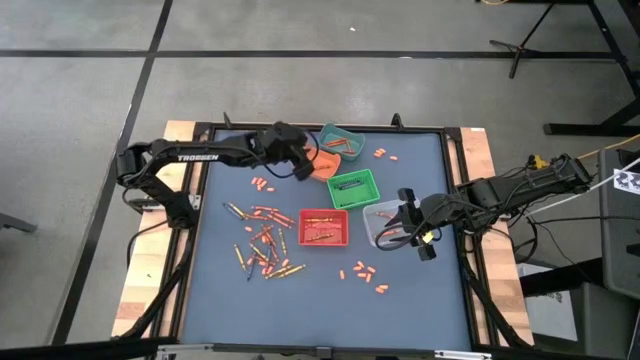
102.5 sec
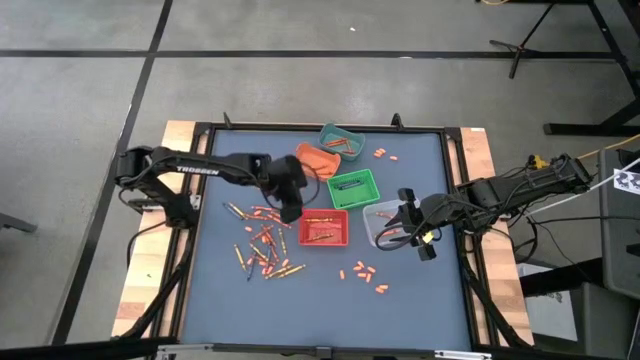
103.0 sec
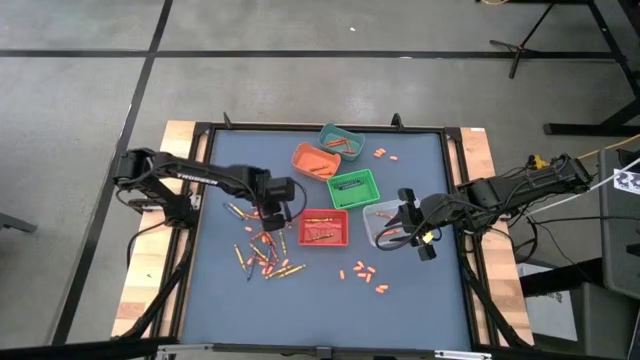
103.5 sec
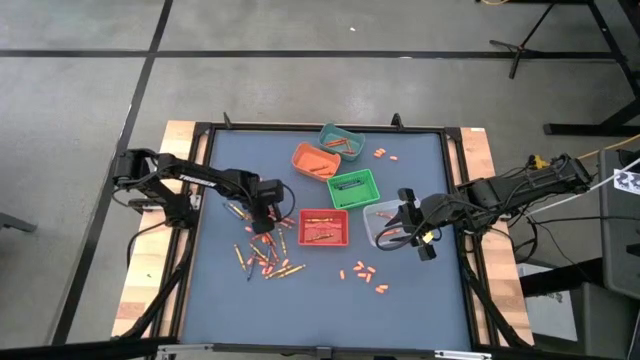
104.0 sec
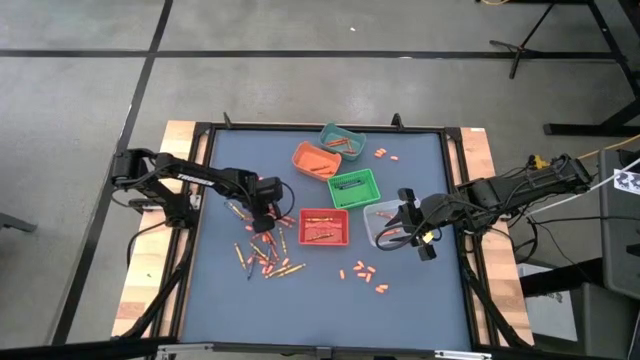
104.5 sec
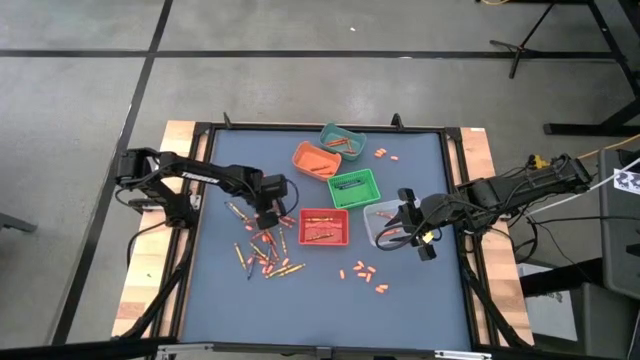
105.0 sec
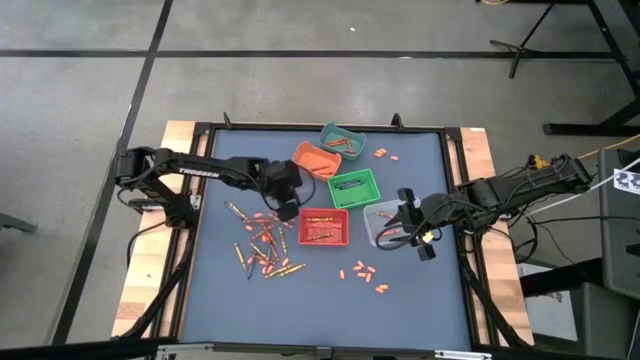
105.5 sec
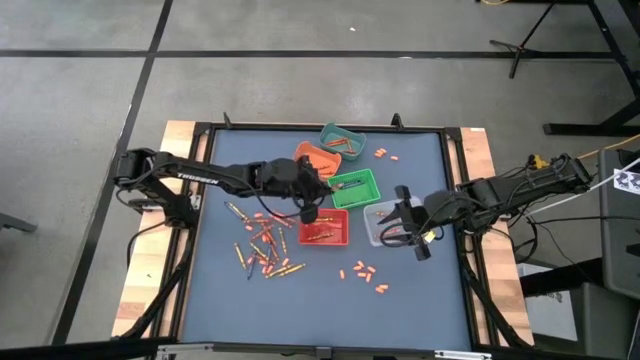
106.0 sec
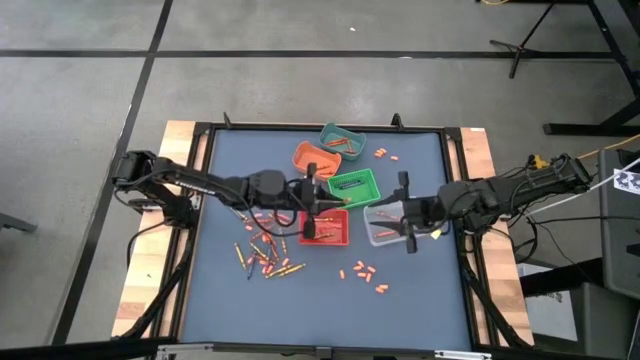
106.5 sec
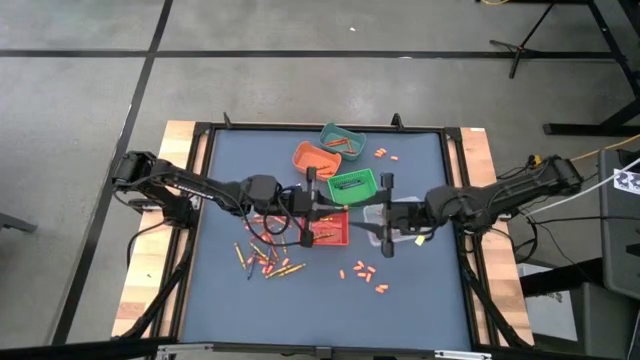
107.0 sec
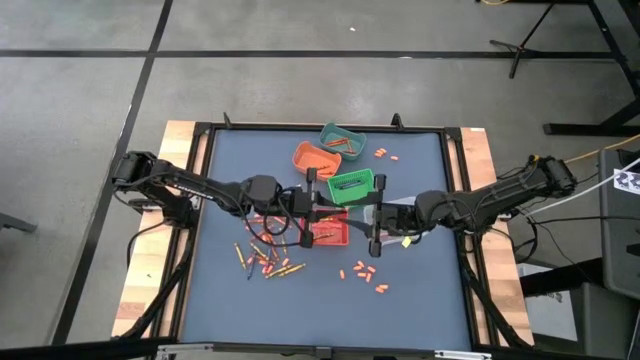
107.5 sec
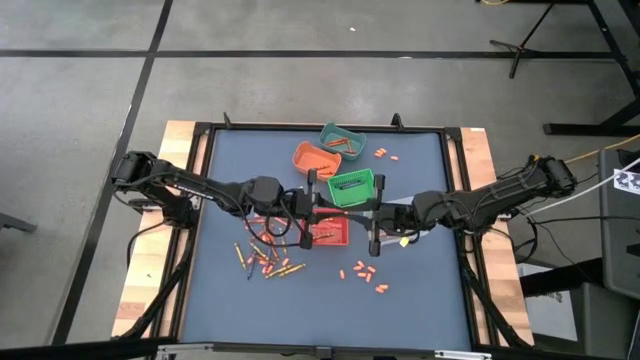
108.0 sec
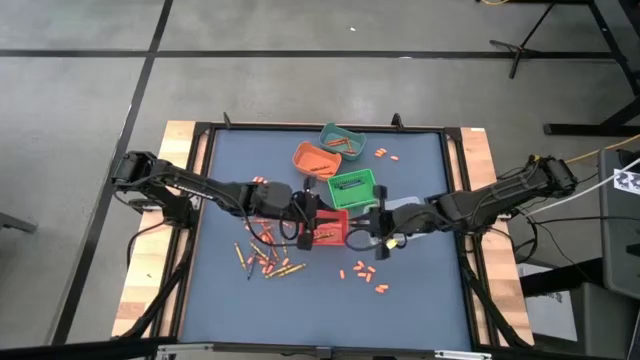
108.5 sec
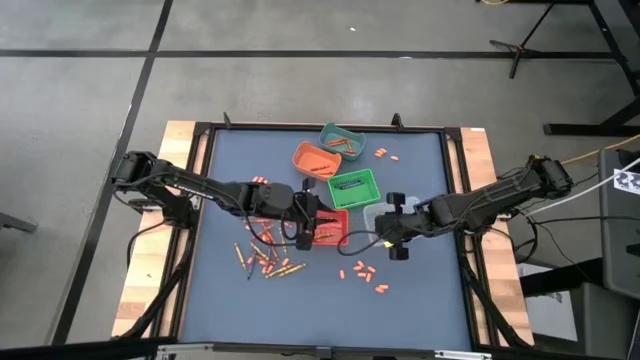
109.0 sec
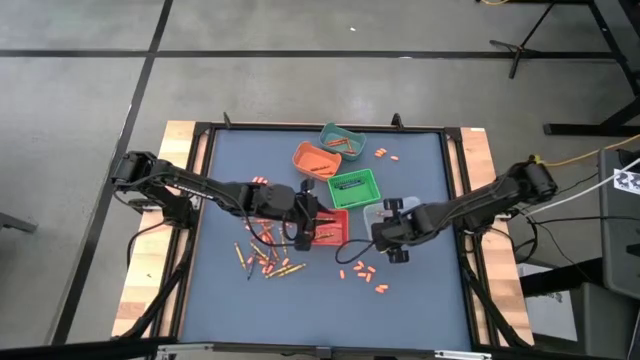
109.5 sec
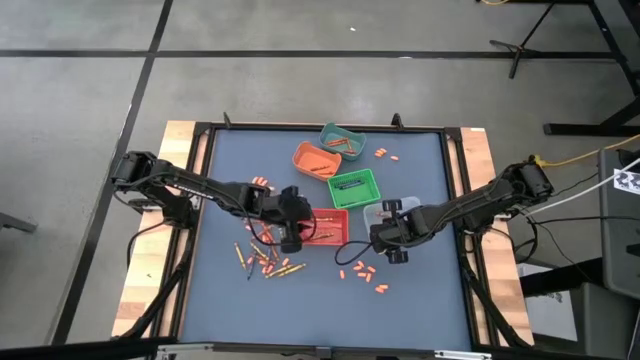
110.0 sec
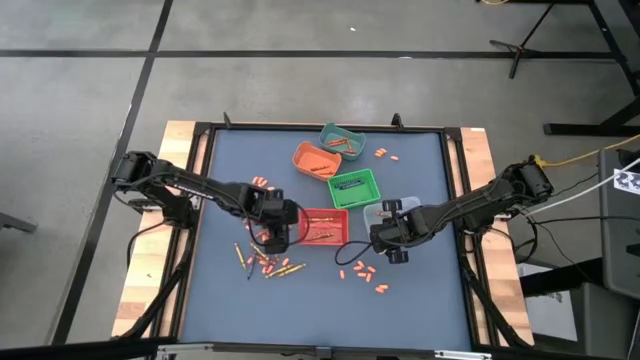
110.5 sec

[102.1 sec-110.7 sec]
Task: Sort crayons
Put the light orange crayon into the transparent bin

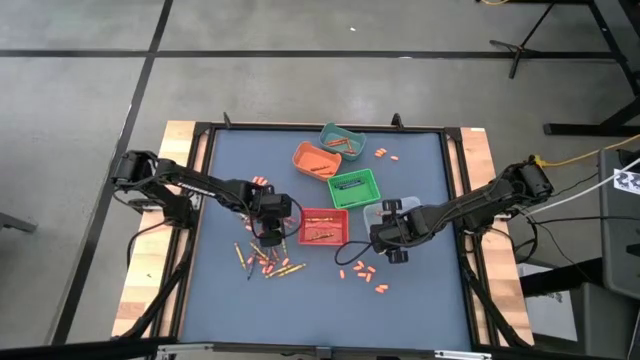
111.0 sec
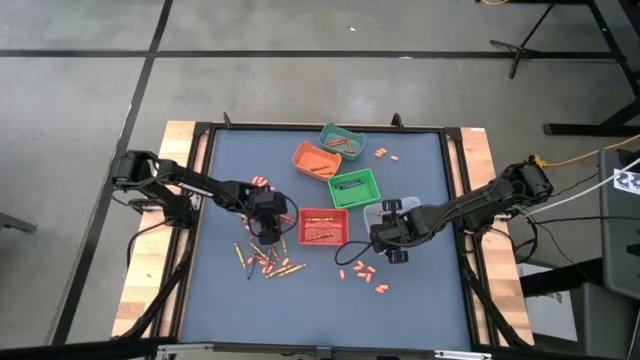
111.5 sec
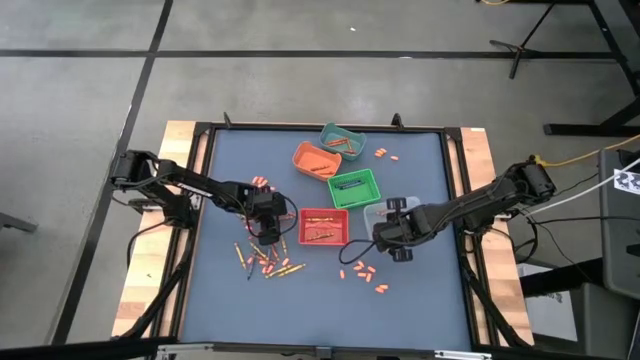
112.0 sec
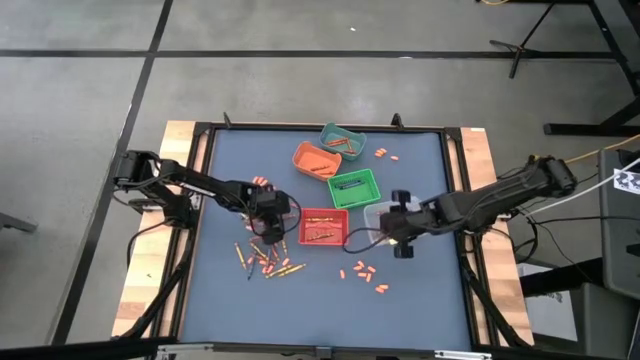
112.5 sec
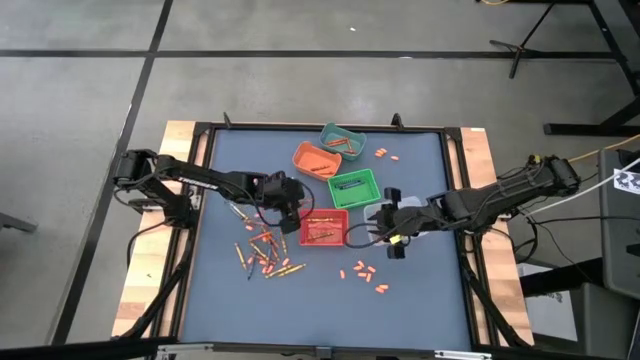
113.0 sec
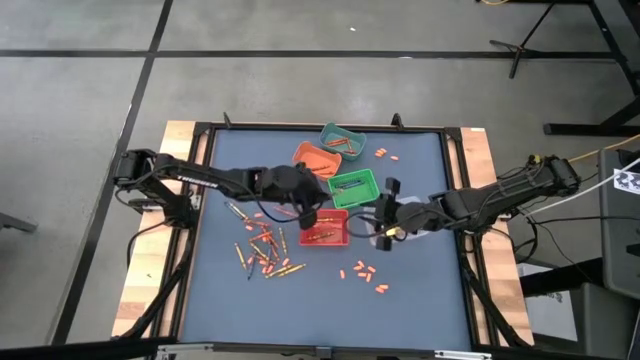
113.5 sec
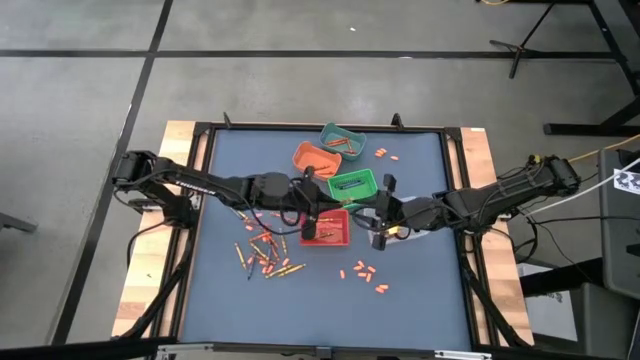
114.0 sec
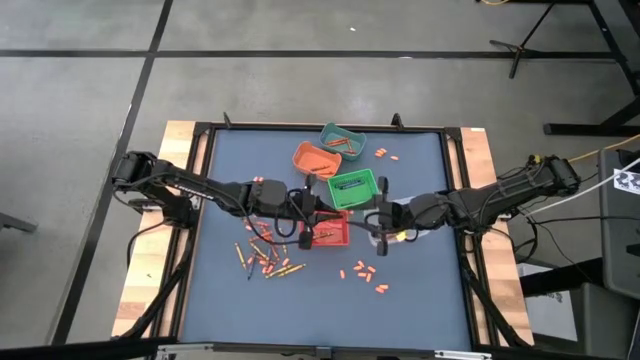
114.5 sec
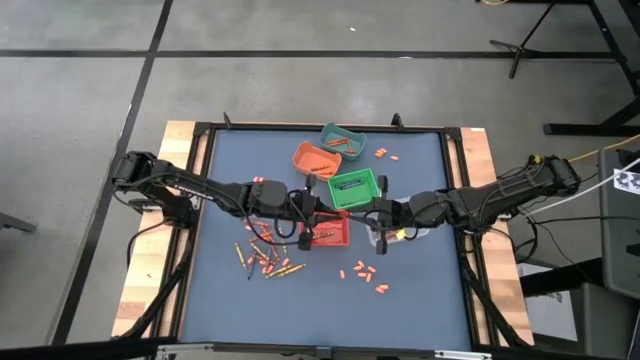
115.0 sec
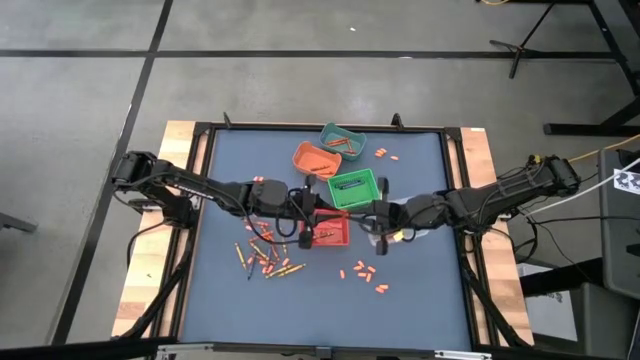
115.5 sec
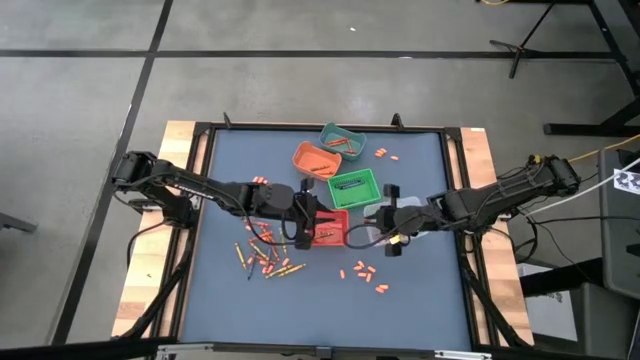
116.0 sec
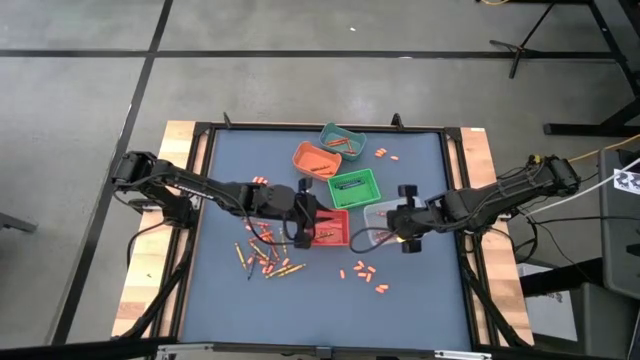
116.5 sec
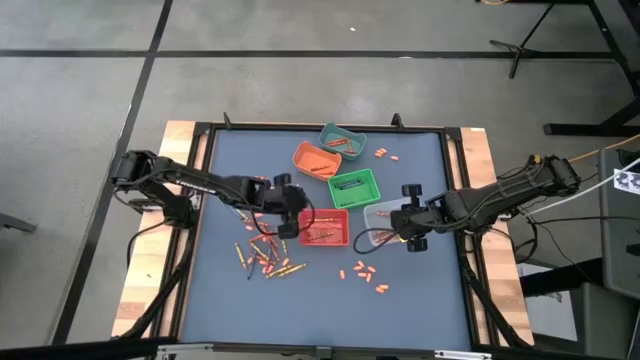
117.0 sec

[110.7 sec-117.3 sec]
Put the light orange crayon into the transparent bin

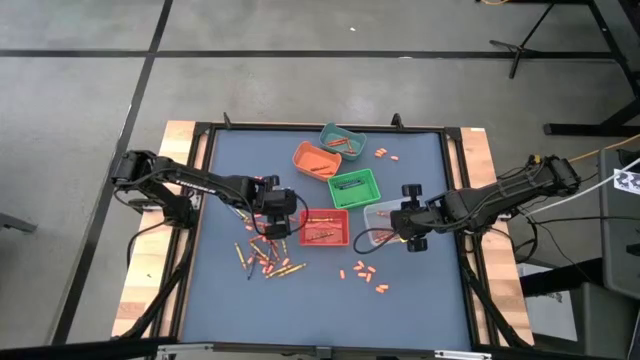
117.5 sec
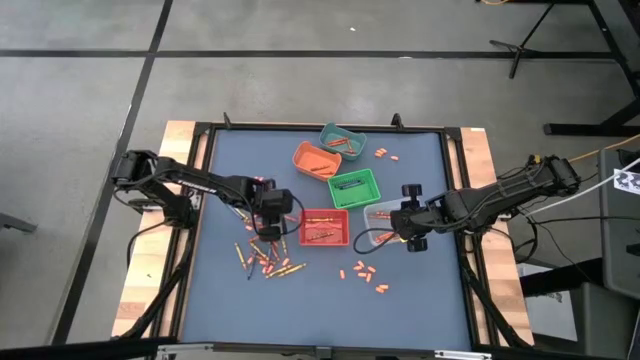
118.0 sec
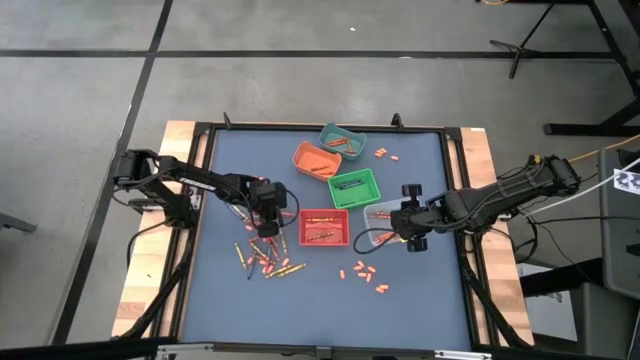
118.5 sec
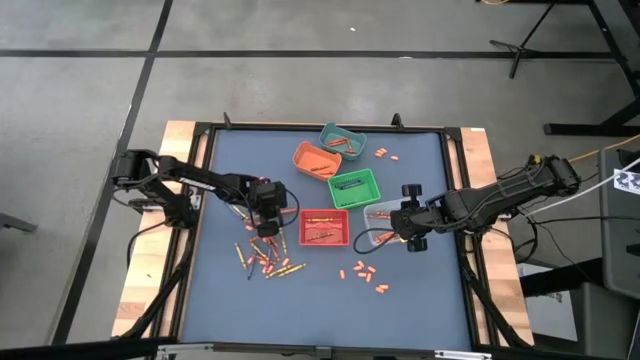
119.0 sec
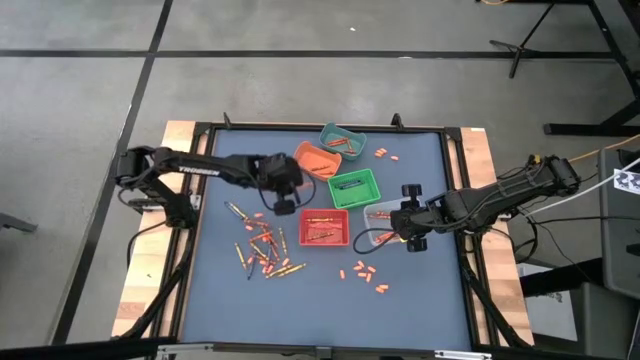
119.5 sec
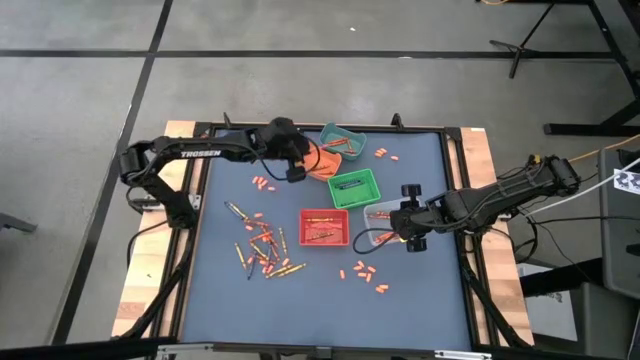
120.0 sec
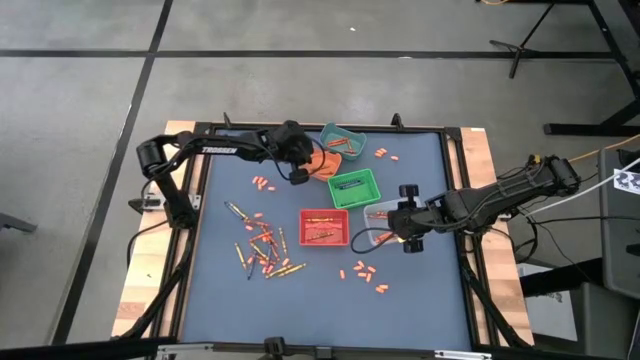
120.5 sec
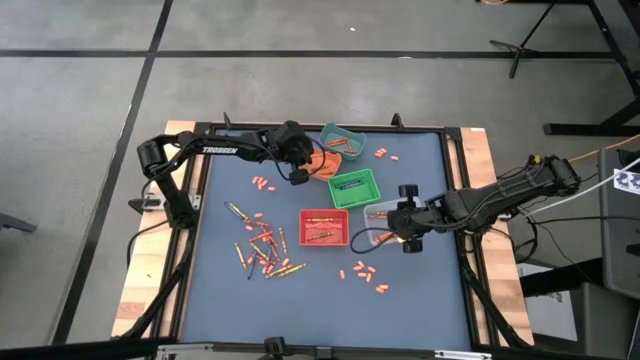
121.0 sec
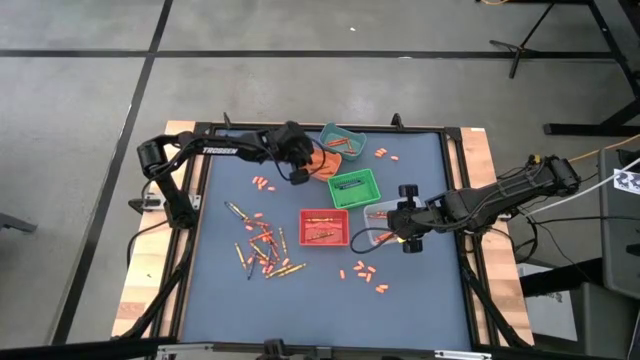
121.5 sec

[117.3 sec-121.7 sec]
Put the orange crayon into the orange bin

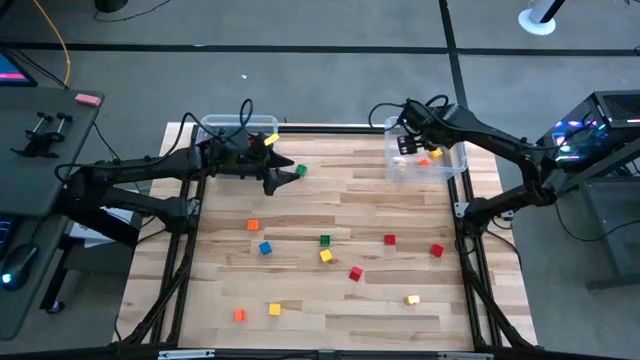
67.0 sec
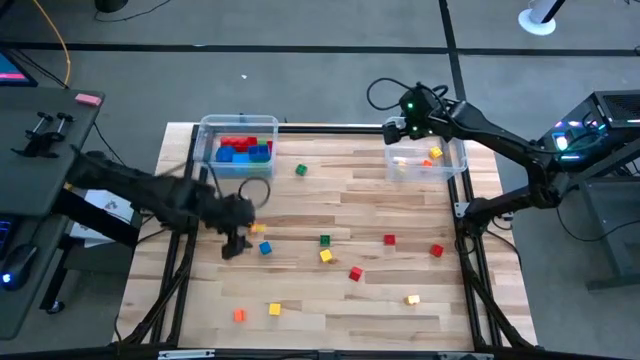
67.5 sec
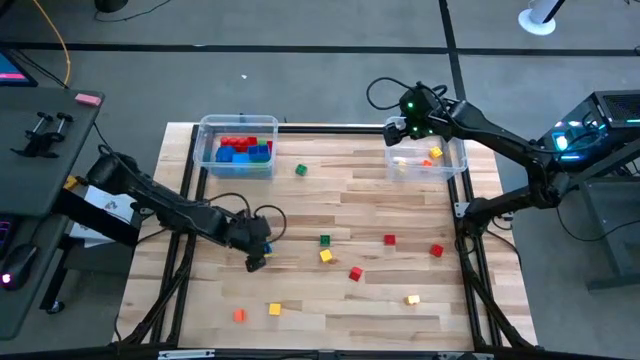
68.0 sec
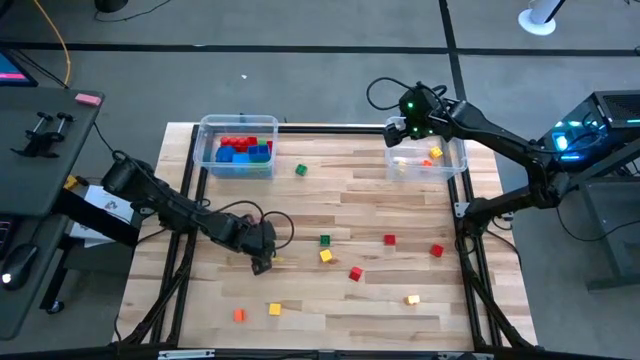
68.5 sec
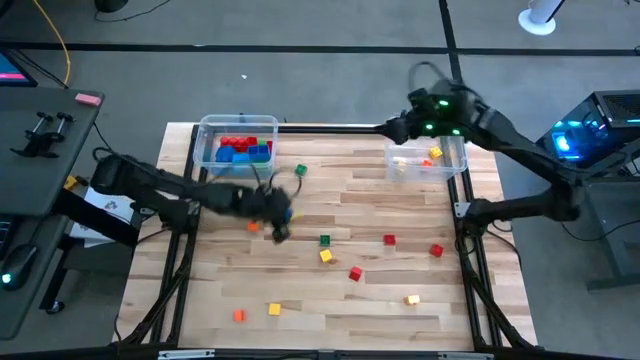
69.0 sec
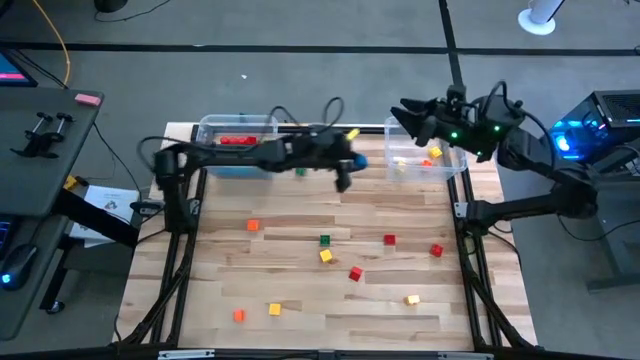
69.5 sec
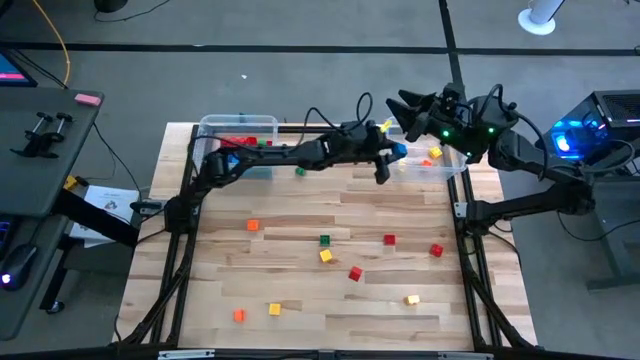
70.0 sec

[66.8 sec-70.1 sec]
Task: Sort blocks by size
Put the small block into the right transparent bin
